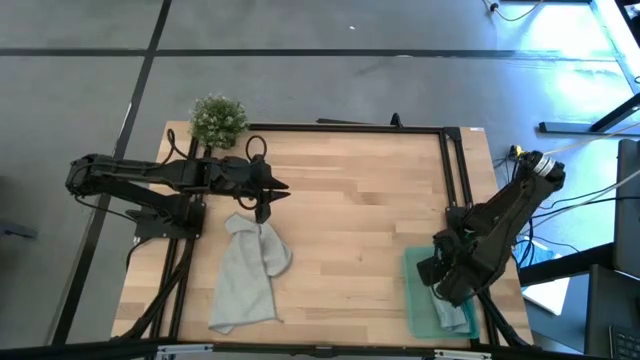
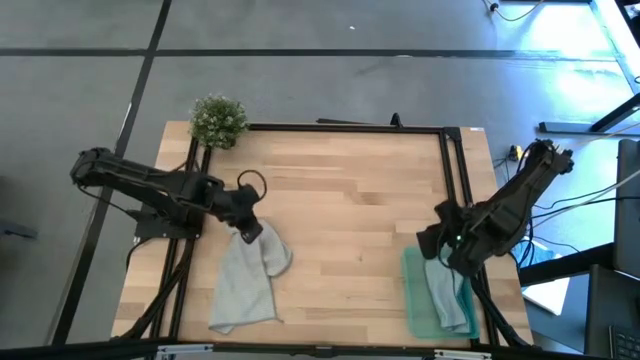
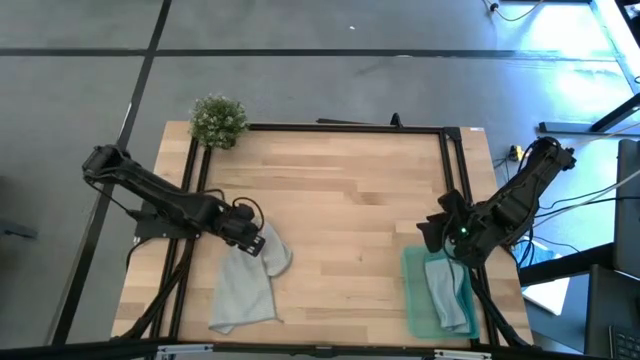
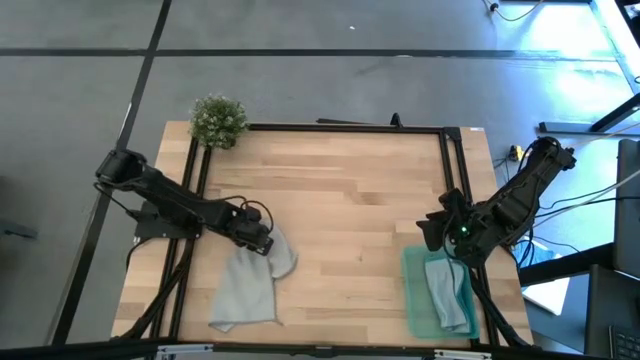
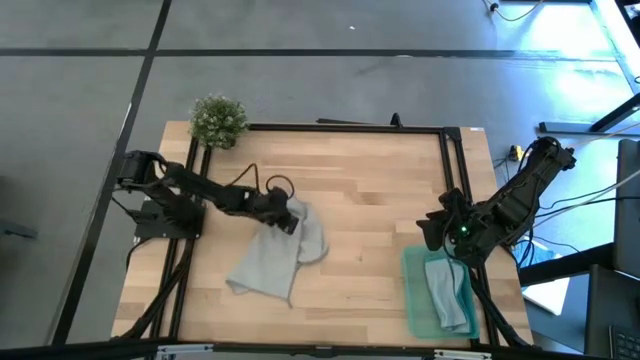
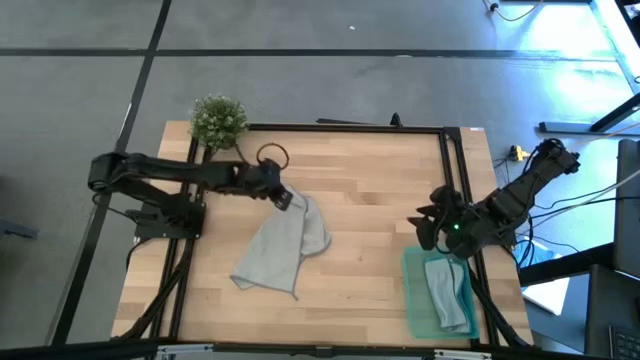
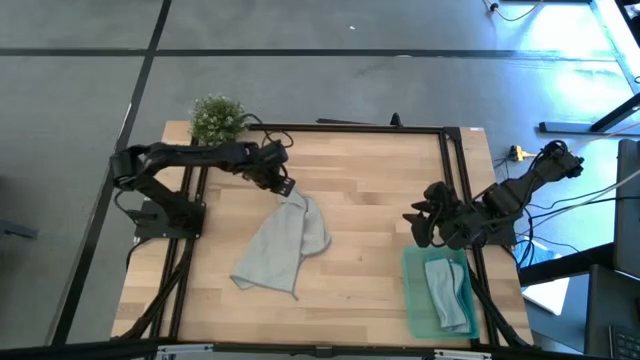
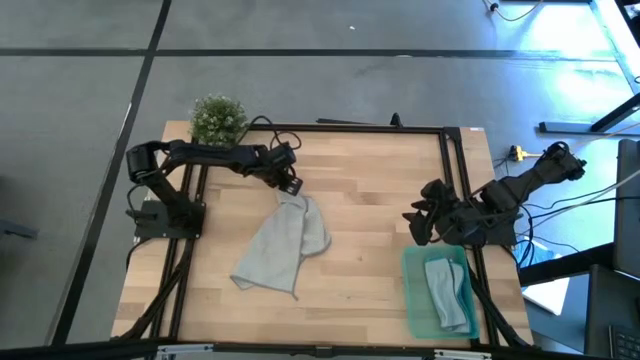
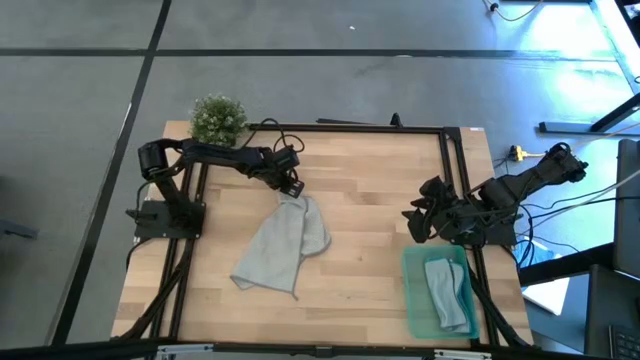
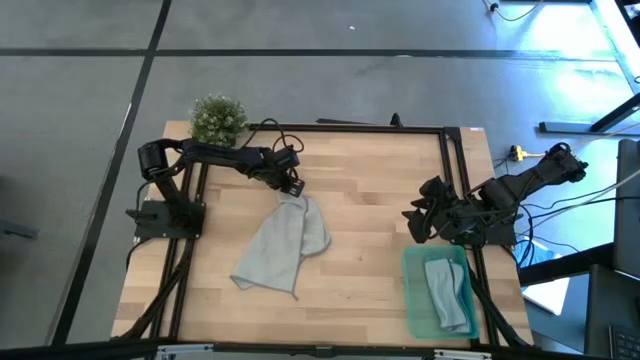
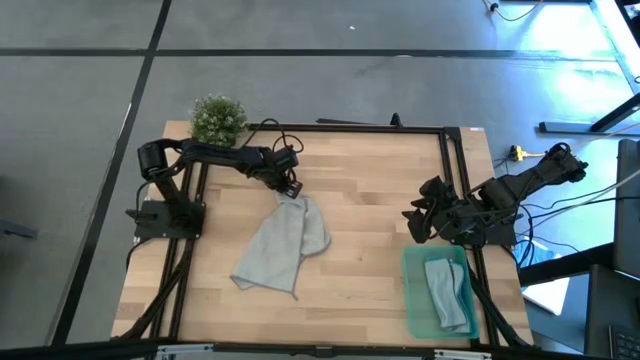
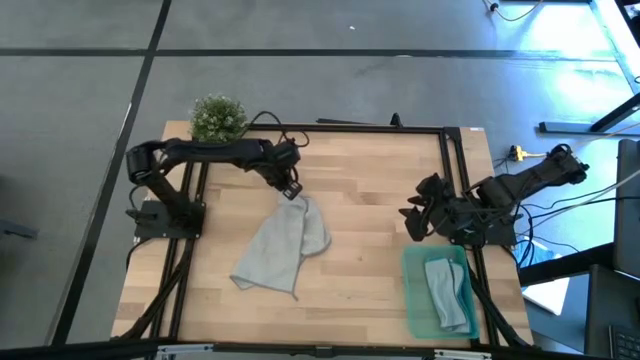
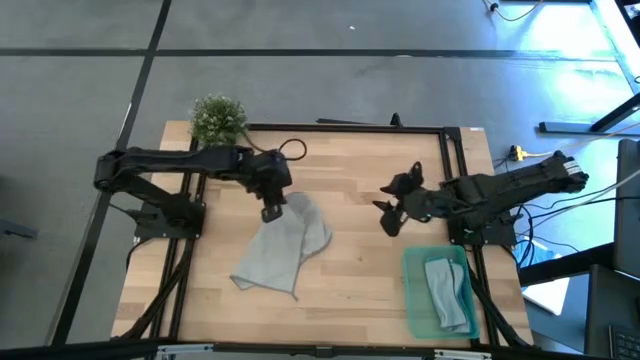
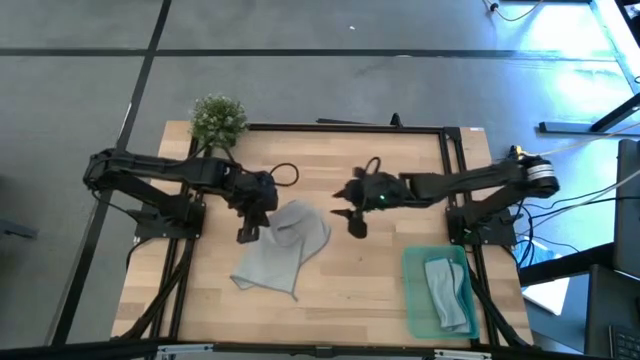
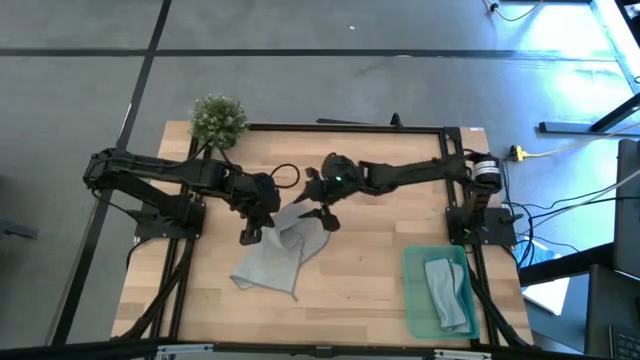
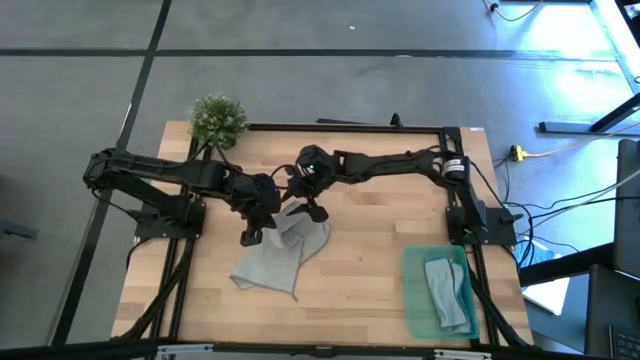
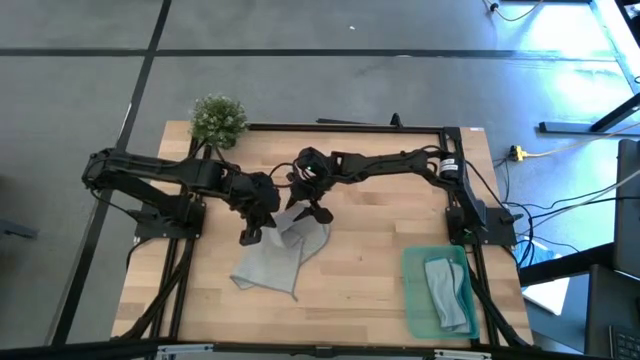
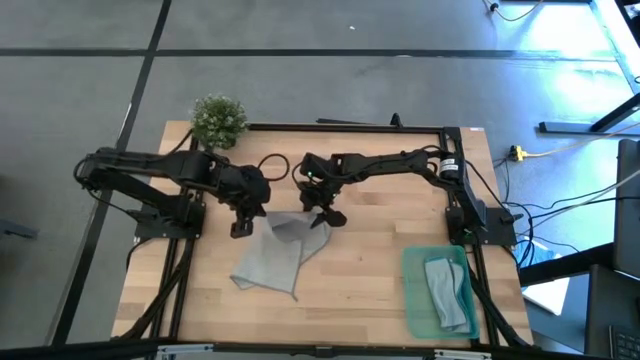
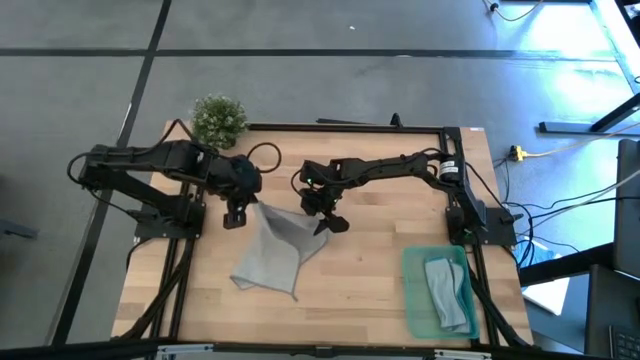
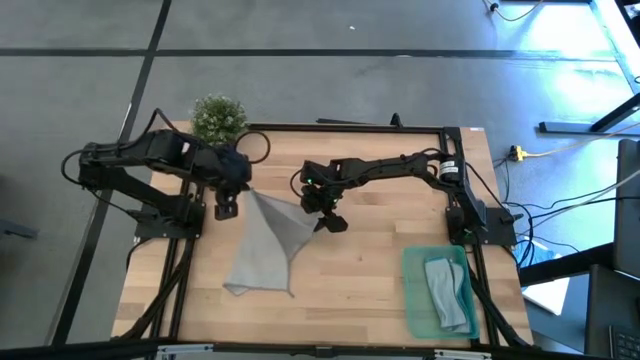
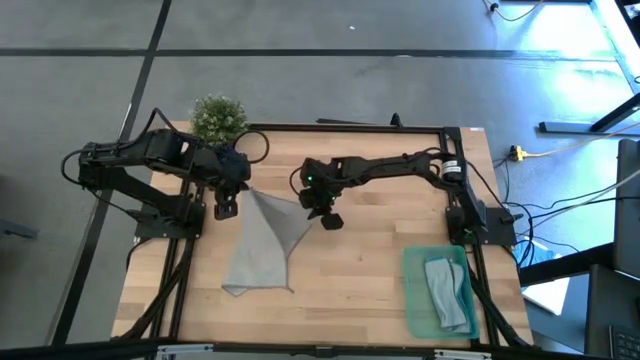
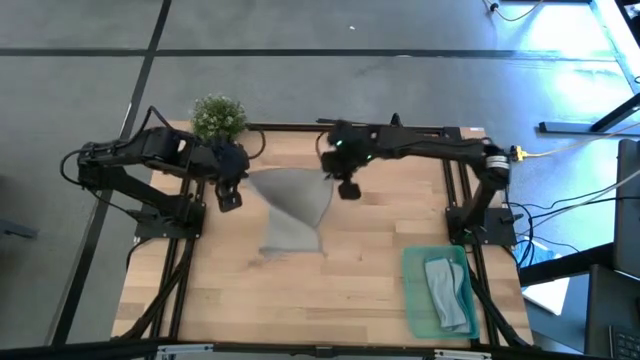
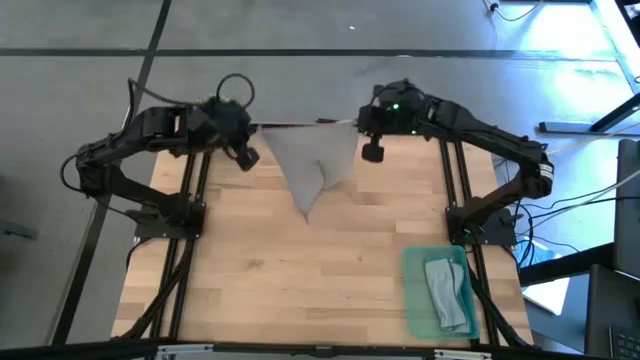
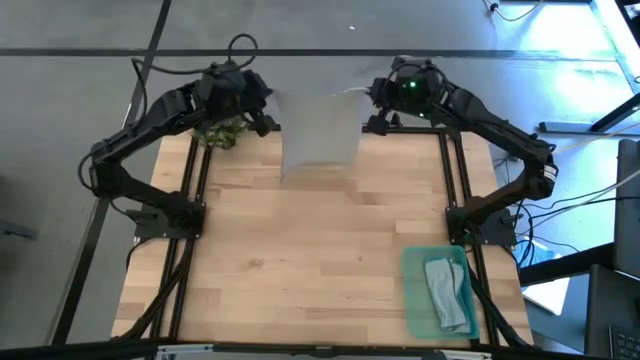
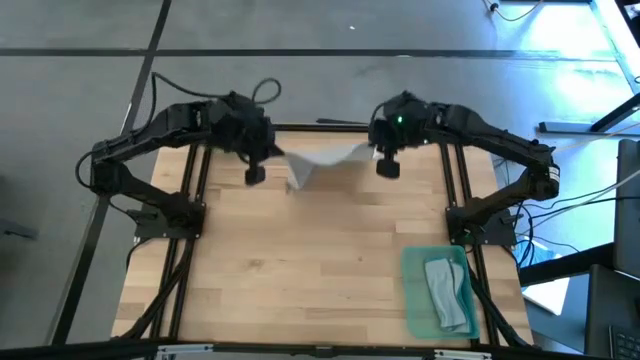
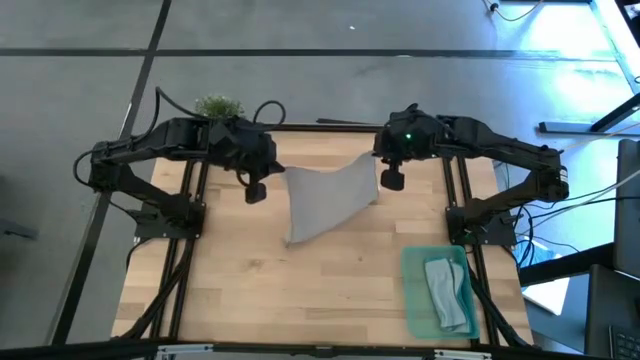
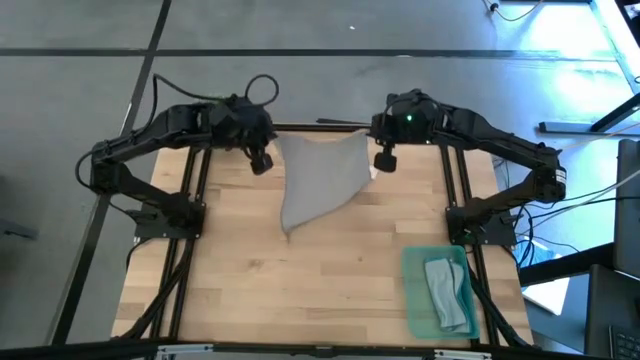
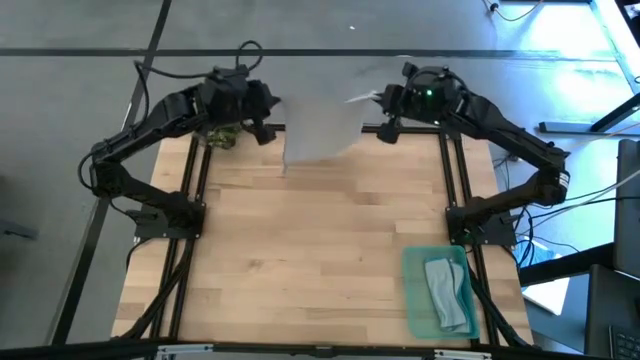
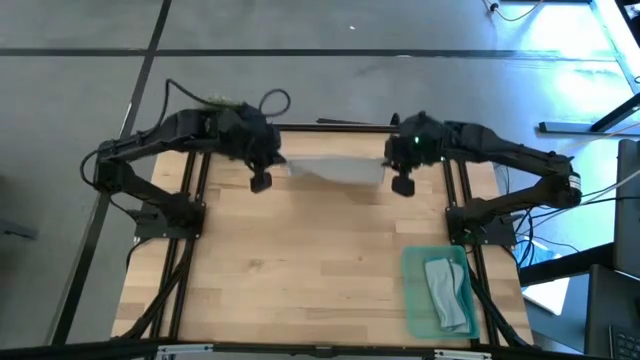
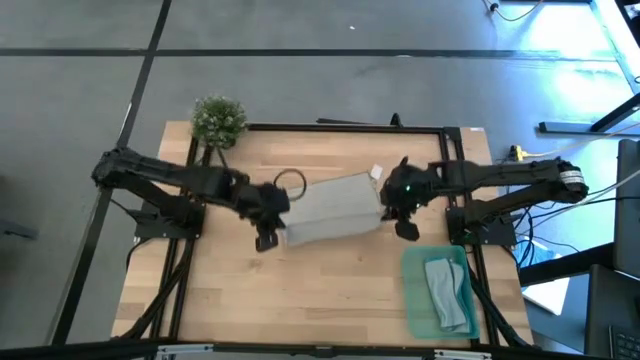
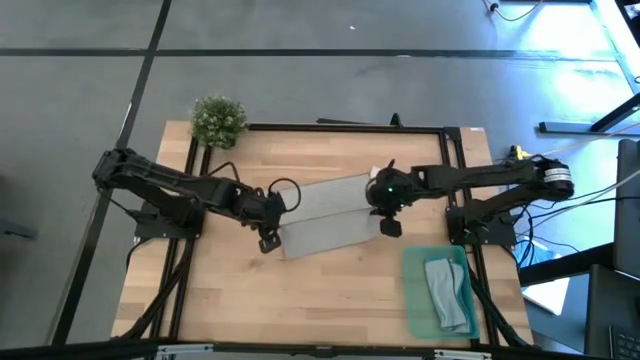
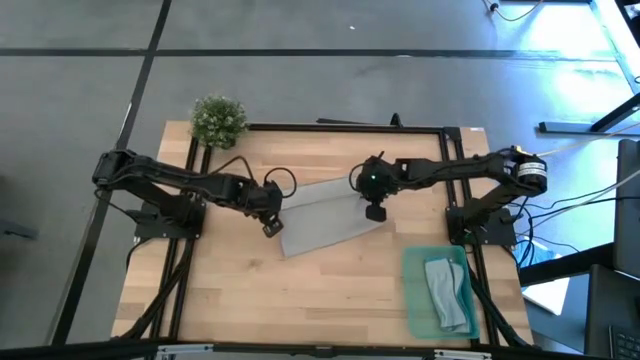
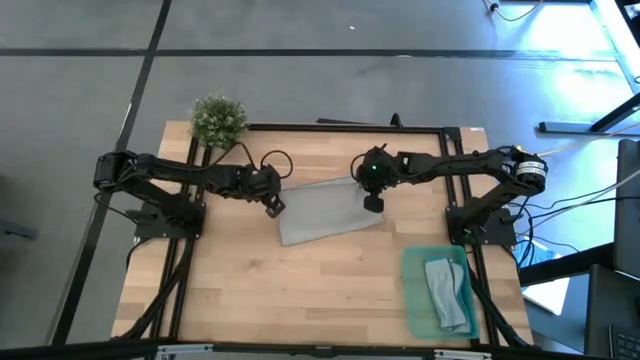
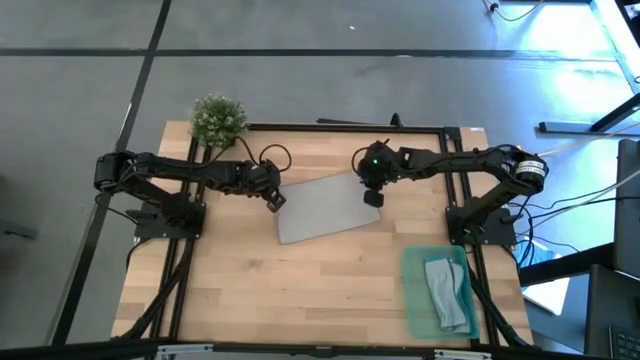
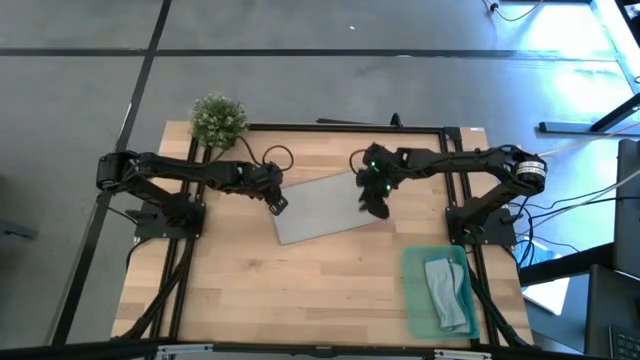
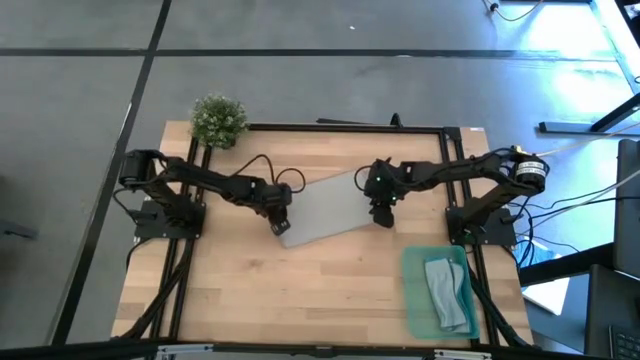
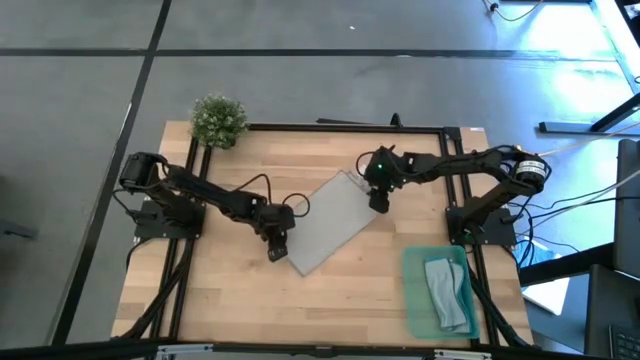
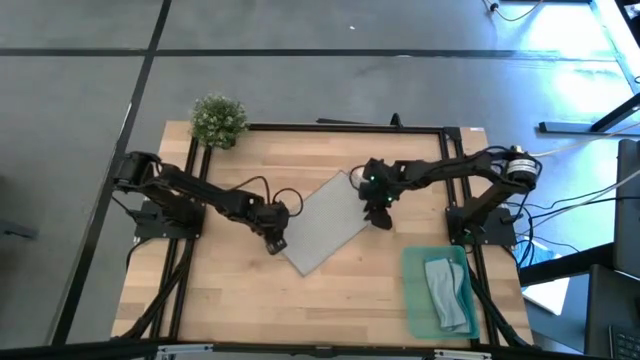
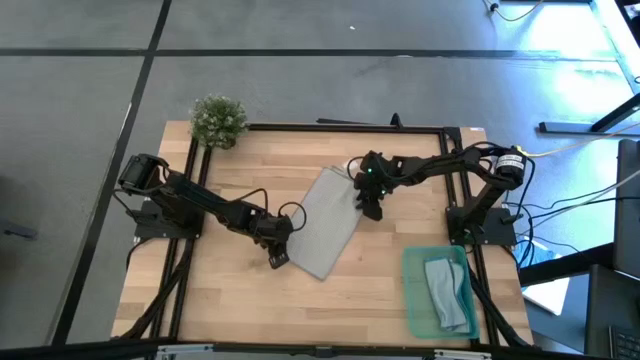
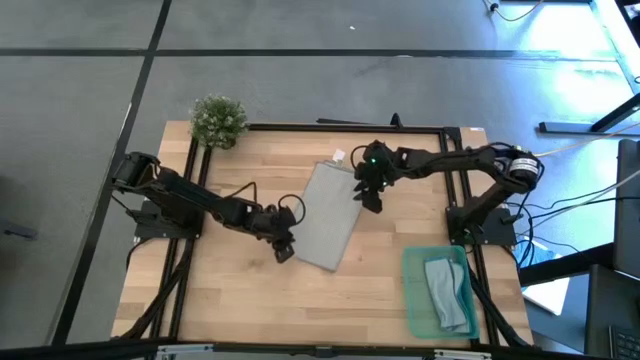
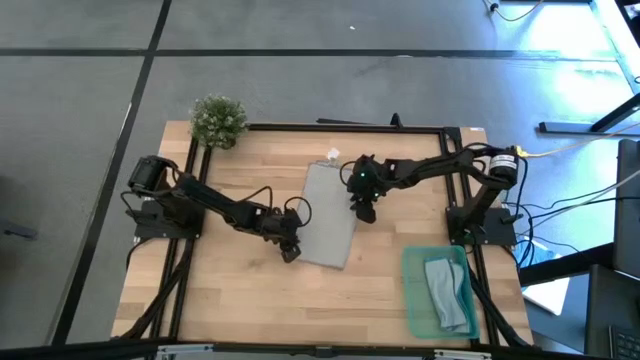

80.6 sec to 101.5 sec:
Task: Roll microfiber towels into tight, uniform cylinder then place into a basket
Fold the gray towel

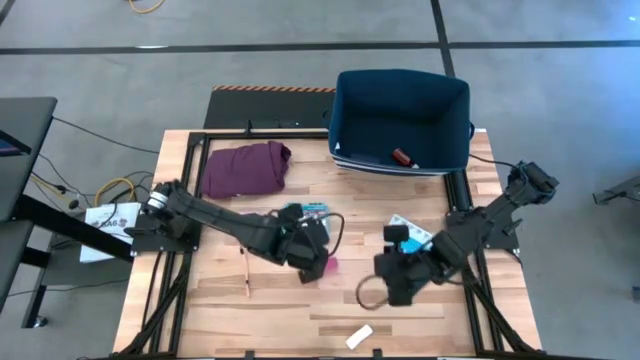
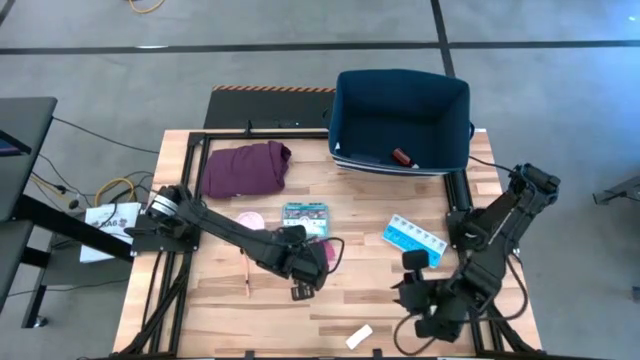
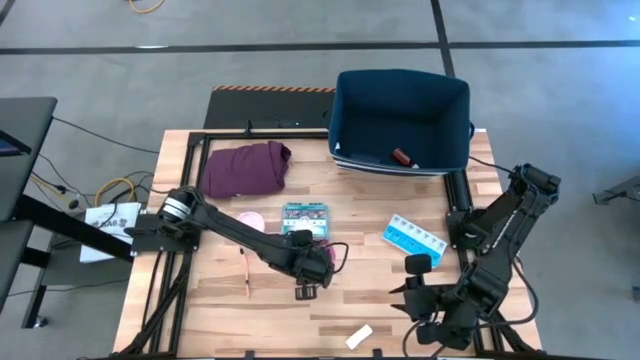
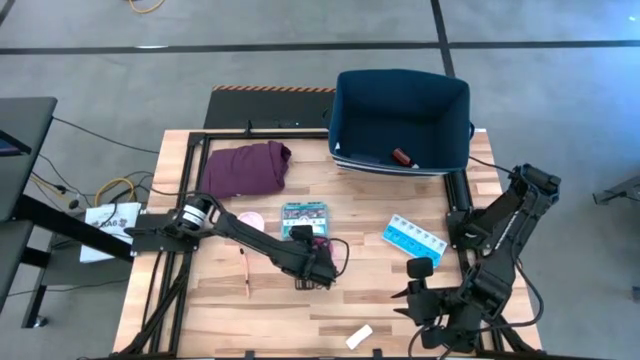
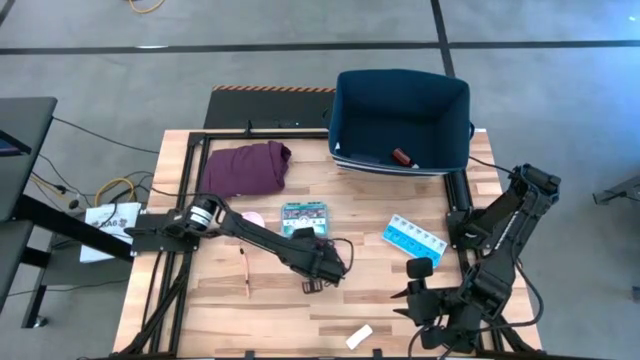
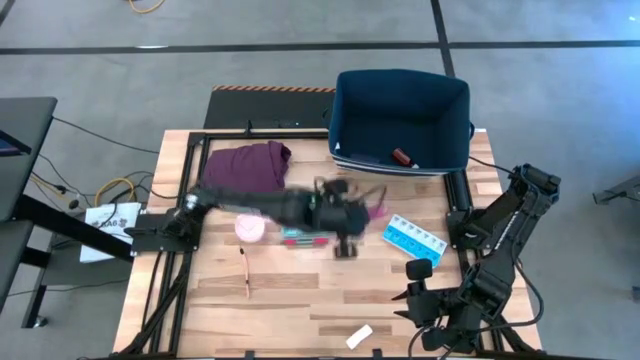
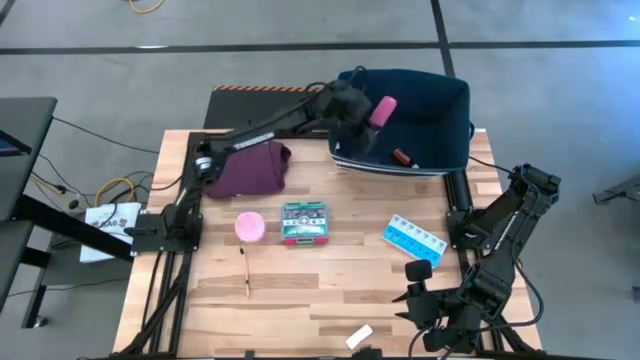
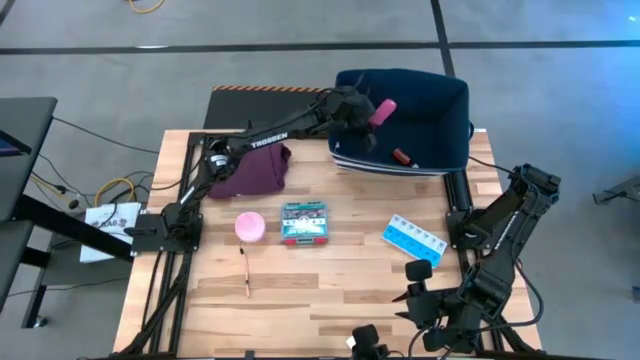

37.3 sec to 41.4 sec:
Task: Pick & place medical supplies in basket/bin
Put the pink bandage into the blue bin
